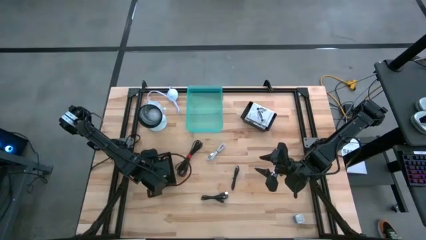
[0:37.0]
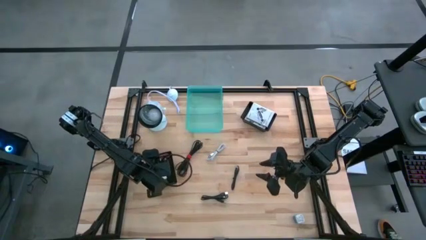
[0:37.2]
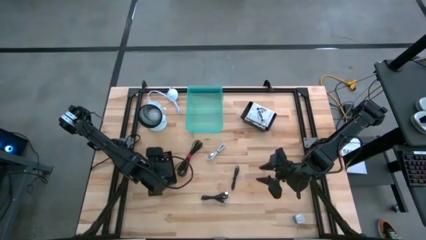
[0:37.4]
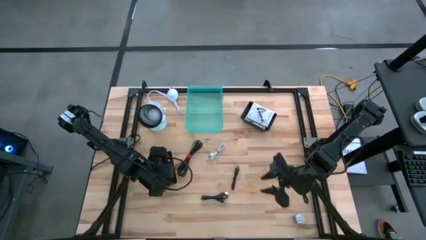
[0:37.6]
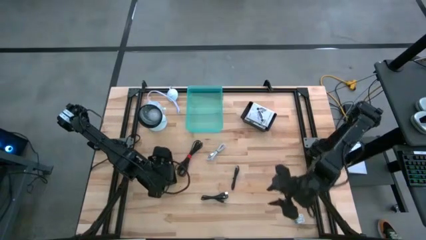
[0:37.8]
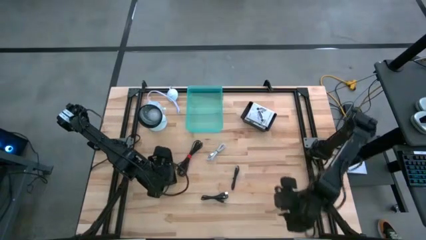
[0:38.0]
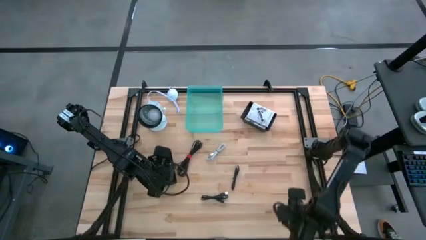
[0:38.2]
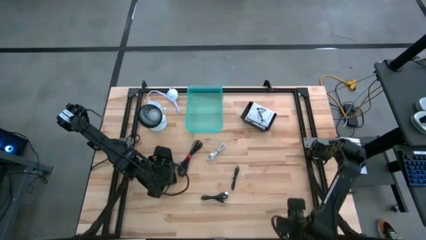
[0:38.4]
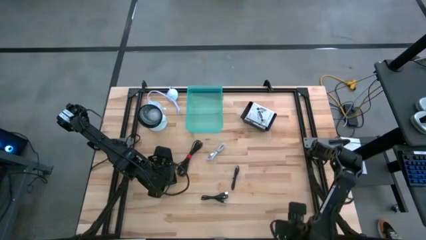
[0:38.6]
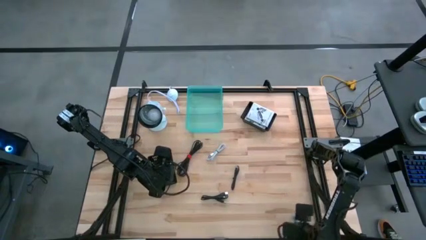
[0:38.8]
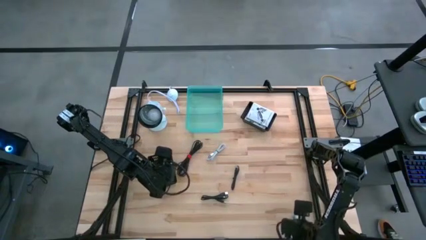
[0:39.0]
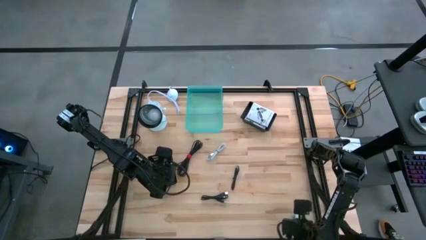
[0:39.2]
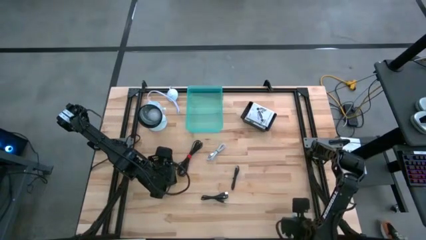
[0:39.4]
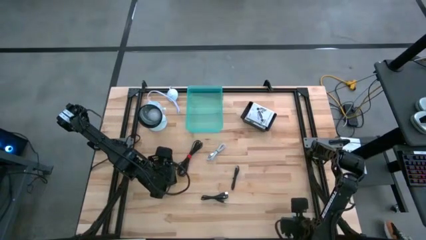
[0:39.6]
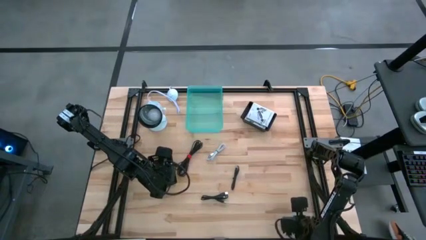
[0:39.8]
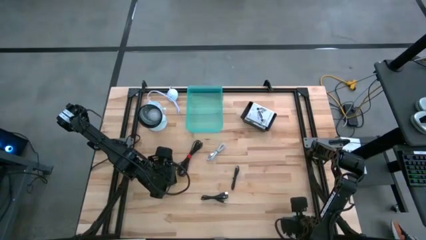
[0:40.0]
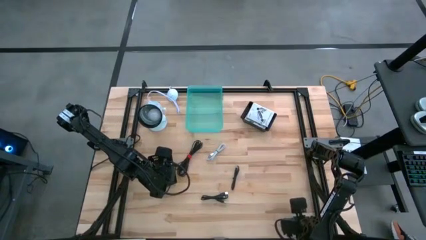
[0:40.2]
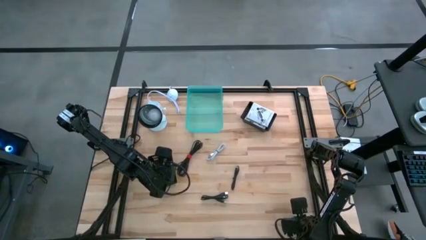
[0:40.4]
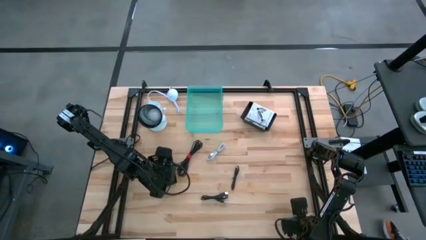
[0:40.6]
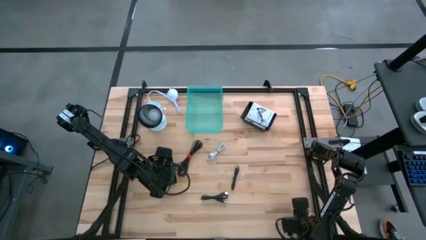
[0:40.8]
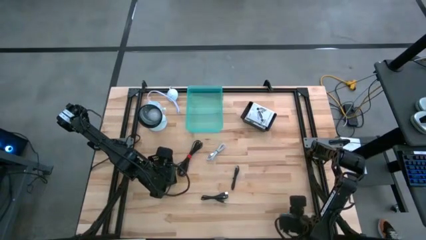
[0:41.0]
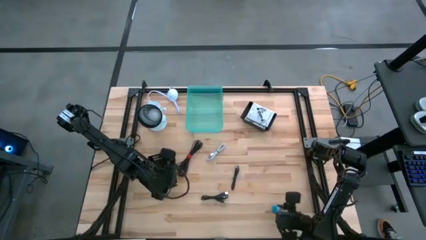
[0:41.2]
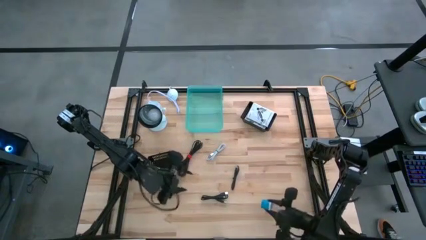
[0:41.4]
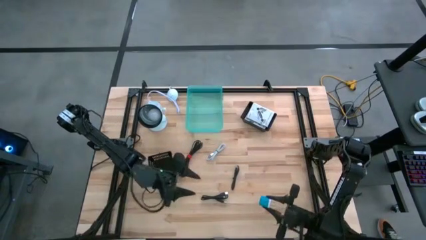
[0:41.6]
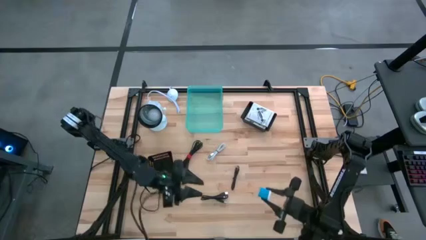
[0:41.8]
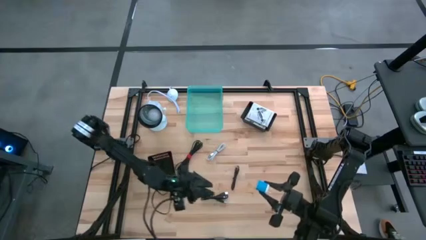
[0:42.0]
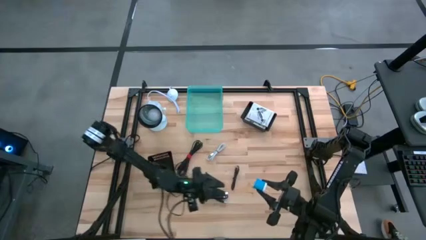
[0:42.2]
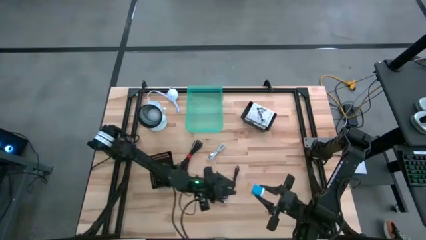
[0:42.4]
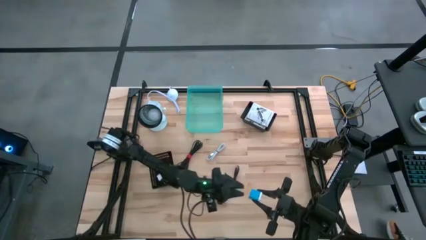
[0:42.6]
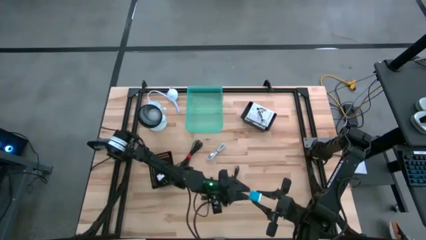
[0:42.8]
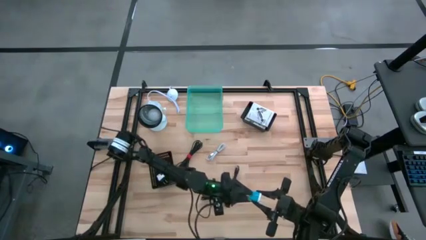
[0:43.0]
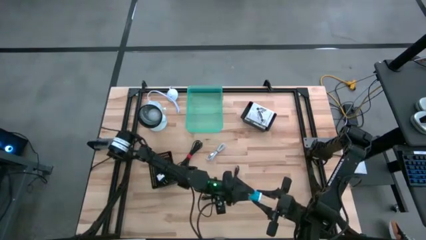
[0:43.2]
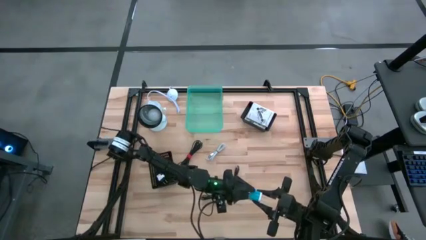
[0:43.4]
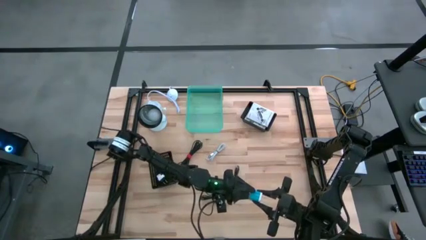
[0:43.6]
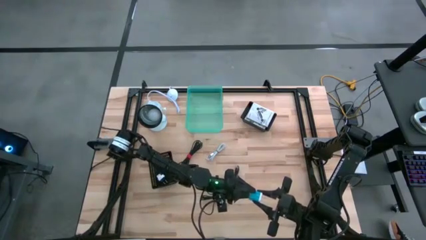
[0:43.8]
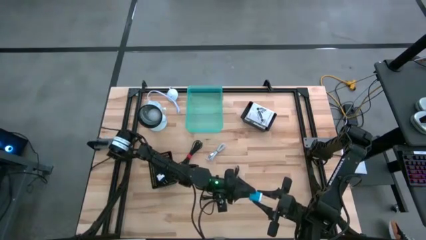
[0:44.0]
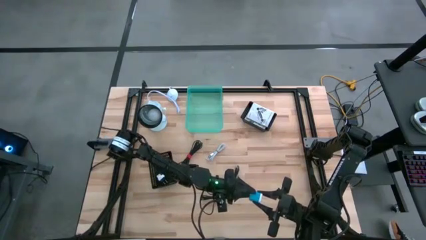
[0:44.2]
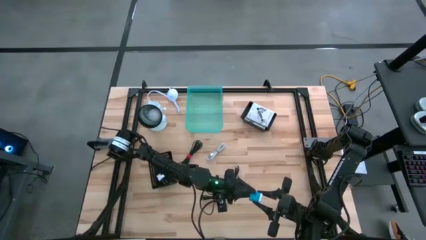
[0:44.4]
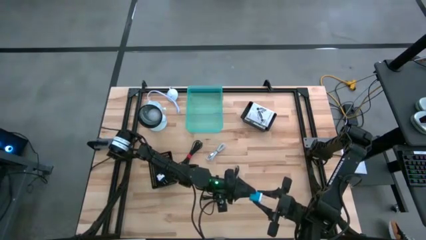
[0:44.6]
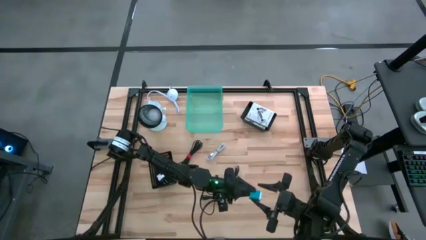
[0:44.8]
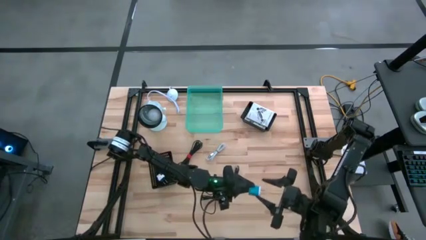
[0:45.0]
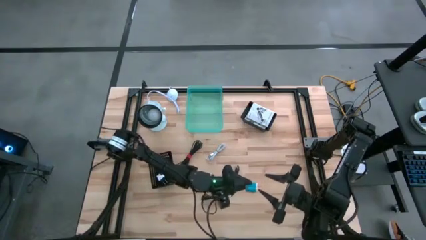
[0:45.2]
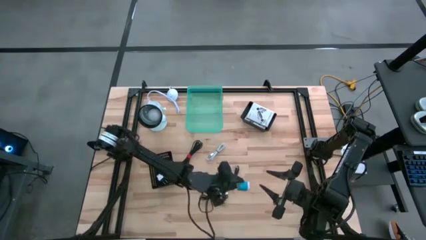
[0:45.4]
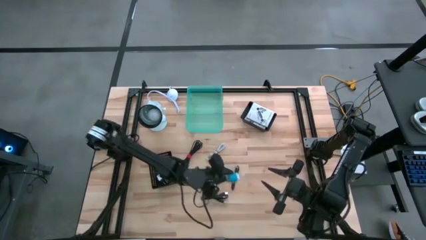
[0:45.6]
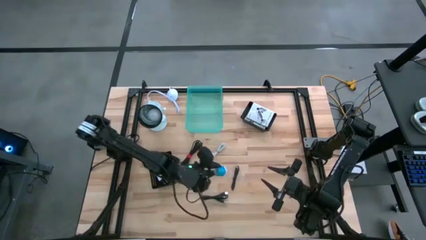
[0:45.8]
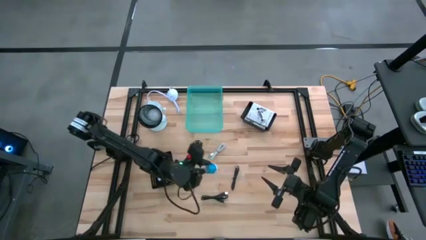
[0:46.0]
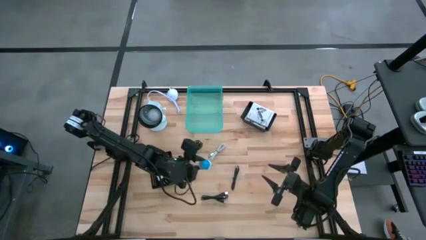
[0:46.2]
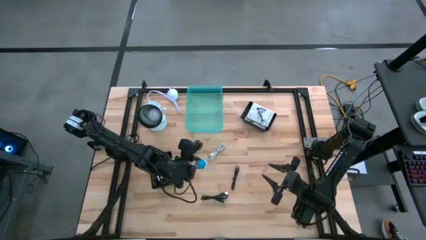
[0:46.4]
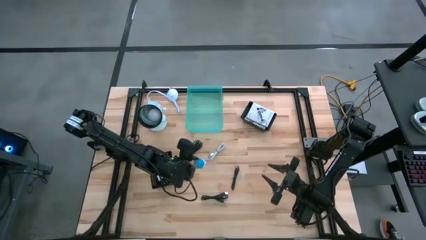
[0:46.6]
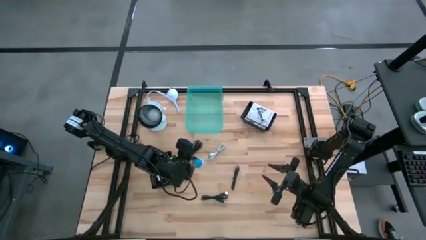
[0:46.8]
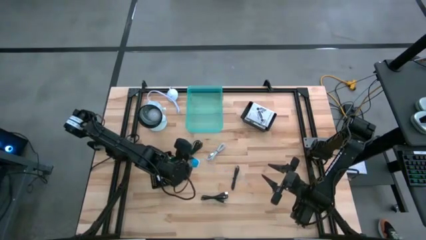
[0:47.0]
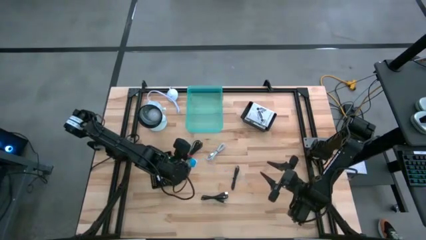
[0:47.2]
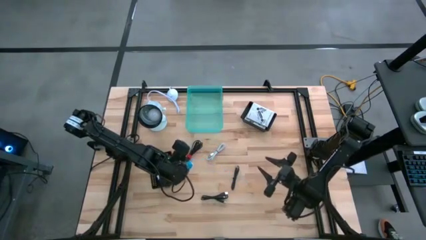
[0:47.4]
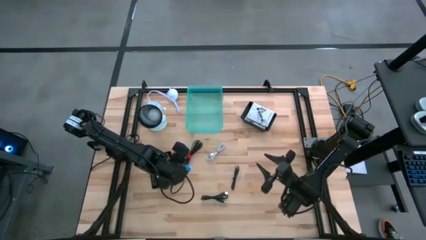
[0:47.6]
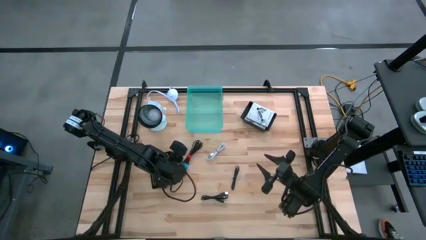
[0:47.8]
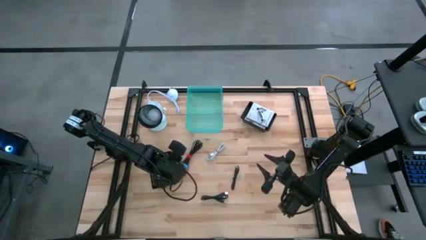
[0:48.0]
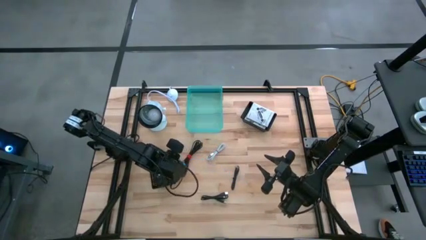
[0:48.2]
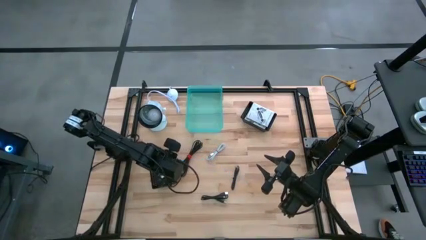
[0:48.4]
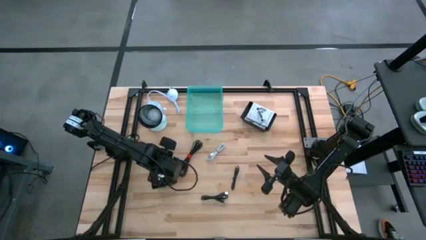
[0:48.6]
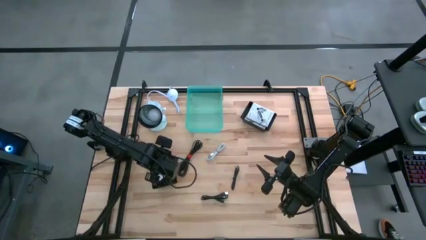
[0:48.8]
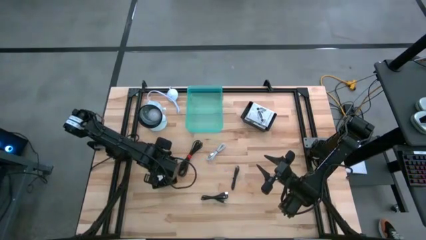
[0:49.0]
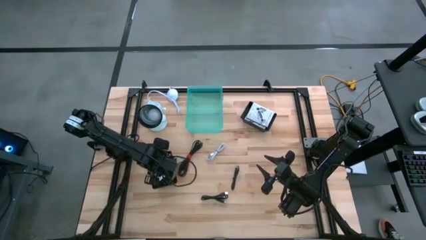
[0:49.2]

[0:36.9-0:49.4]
Task: Pick and place items into bin
Put the blue charger adapter into the left black bin

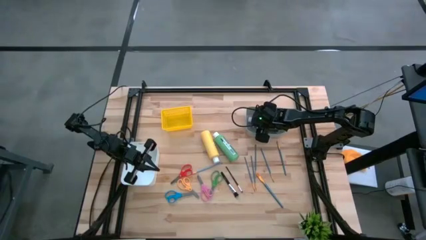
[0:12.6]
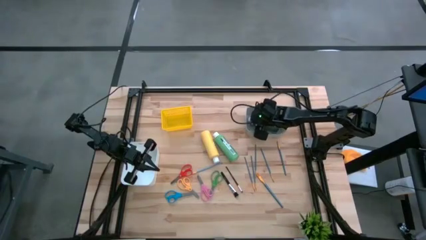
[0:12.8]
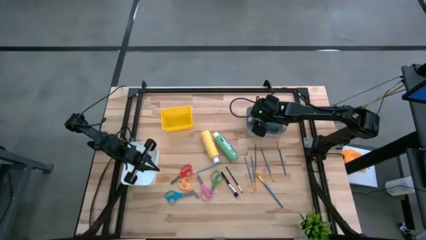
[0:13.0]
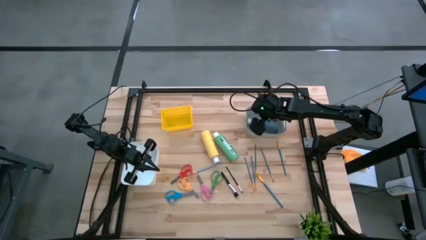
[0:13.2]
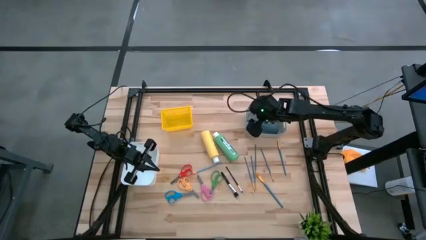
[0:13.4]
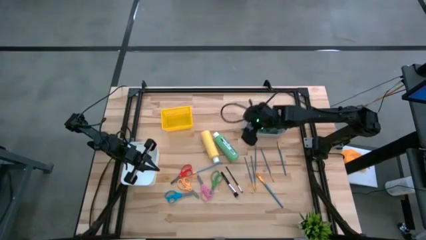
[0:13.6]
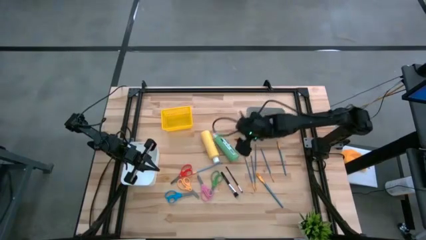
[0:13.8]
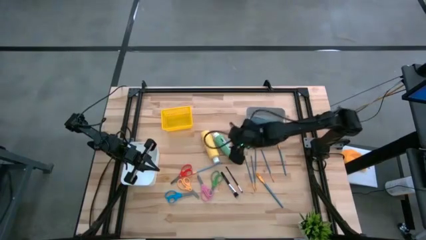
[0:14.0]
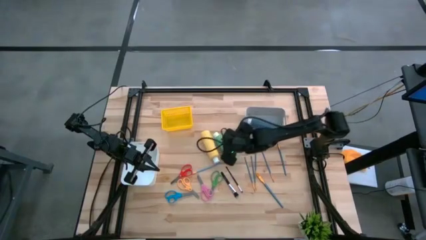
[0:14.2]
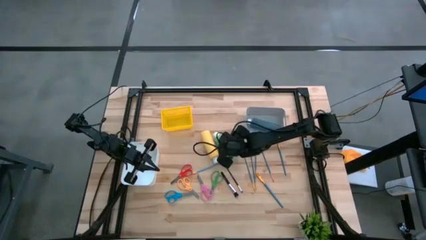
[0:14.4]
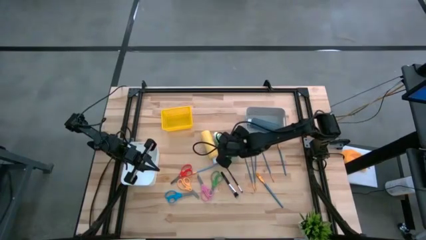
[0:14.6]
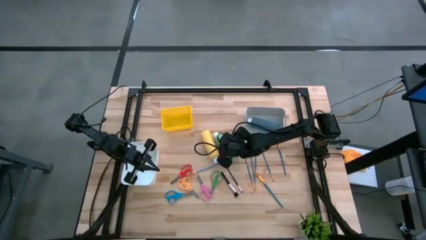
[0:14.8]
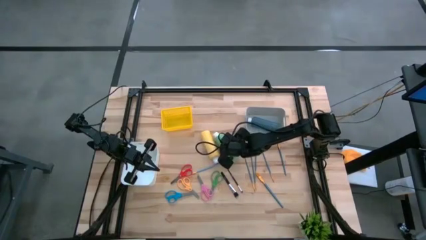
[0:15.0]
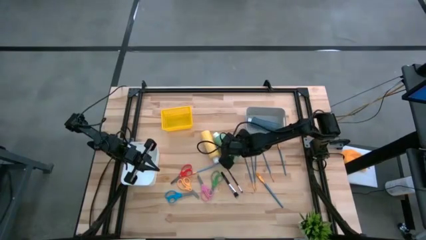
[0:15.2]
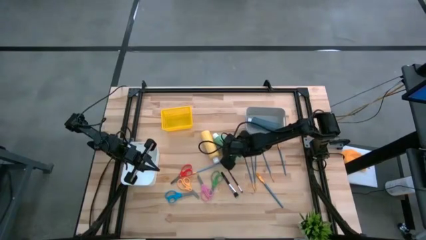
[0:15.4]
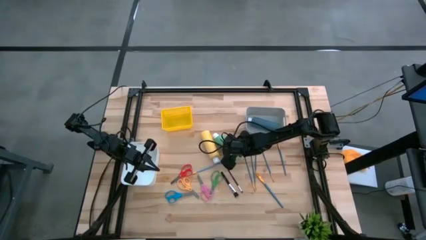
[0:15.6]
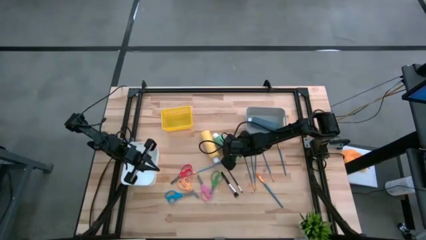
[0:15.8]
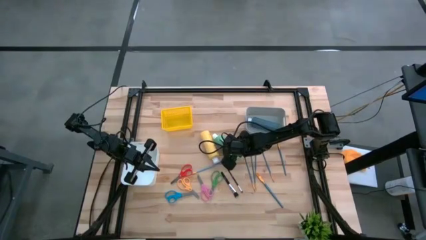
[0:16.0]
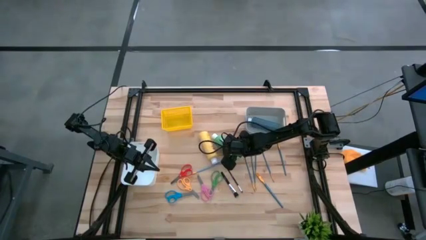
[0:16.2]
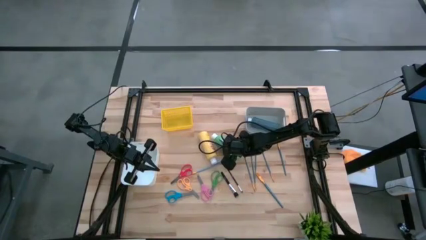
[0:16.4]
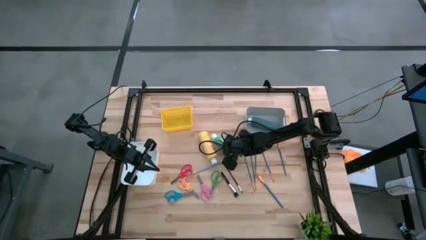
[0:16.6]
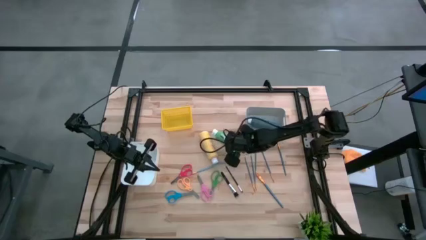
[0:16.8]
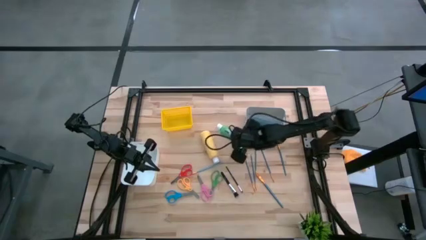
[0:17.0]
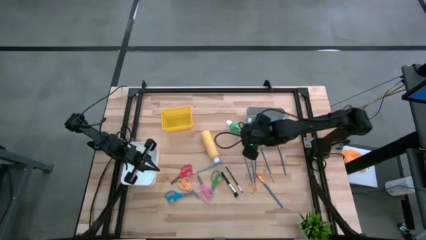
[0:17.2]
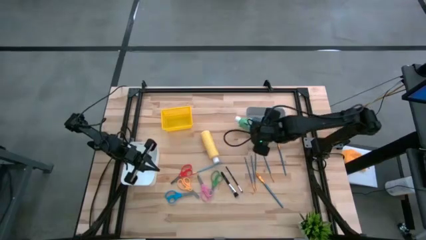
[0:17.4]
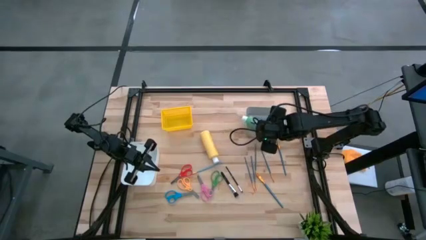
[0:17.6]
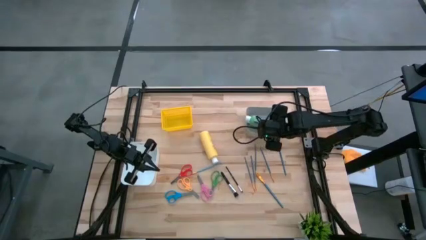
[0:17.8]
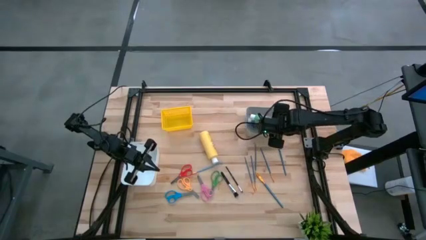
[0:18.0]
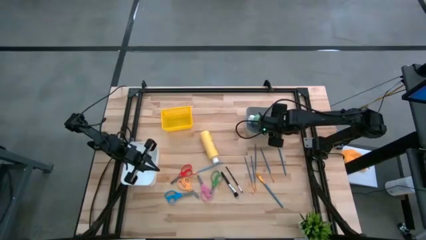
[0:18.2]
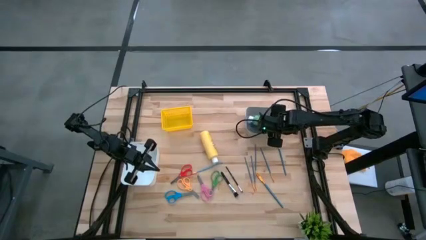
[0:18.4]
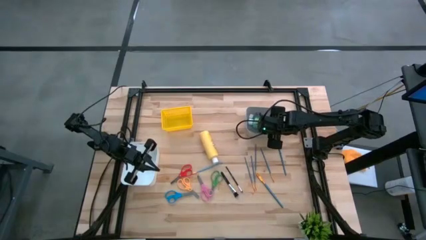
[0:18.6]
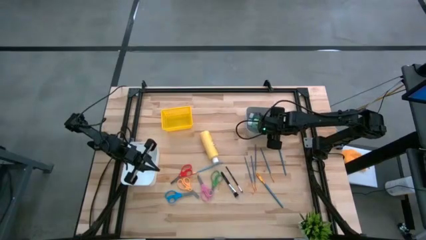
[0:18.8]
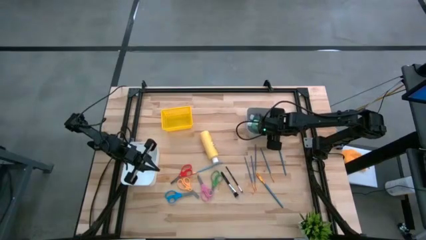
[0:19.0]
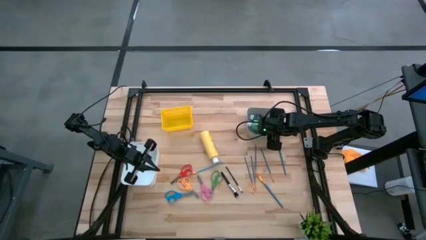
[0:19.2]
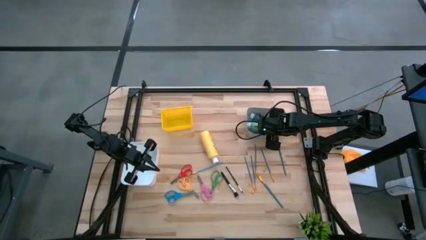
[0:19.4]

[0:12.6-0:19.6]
Task: Pick & Place Paint Supplies
Put the green acrylic paint bottle into the gray bin
